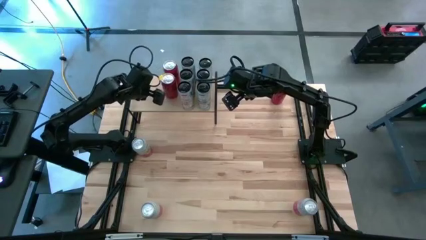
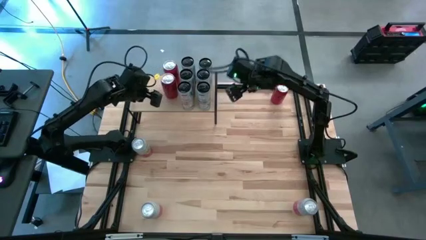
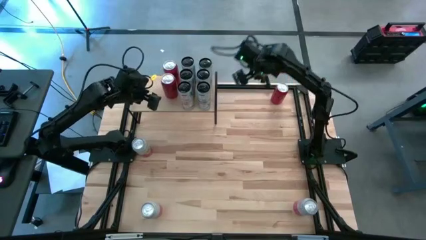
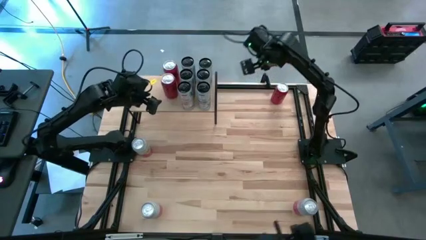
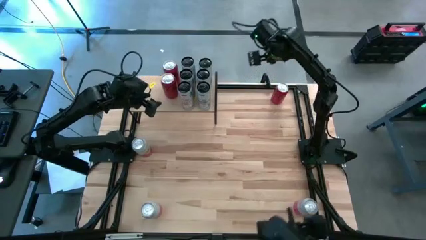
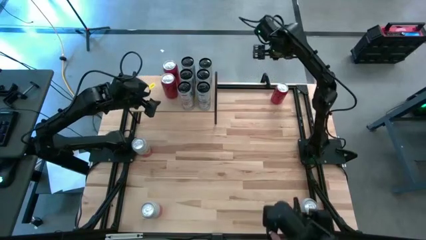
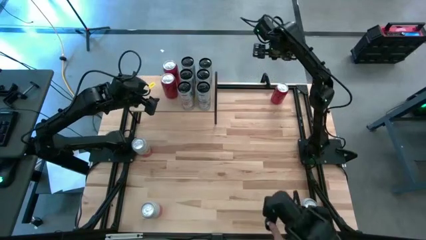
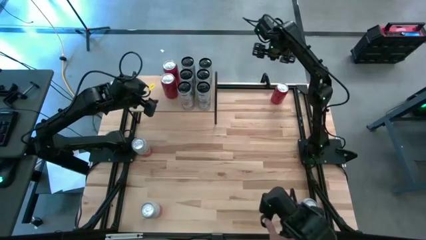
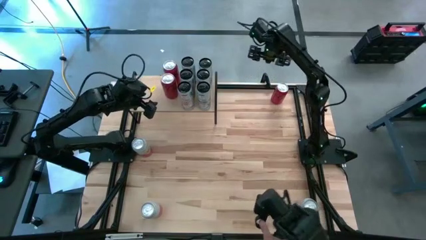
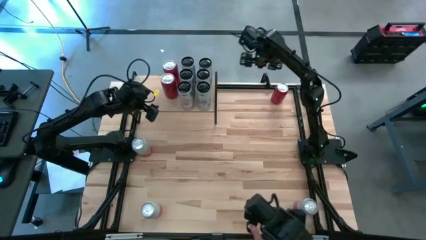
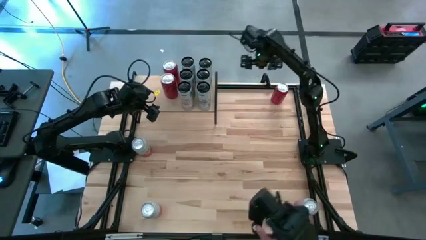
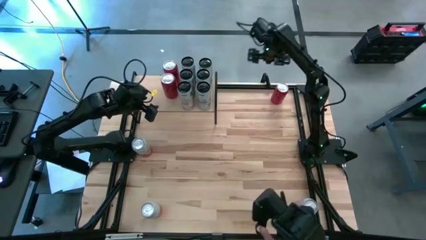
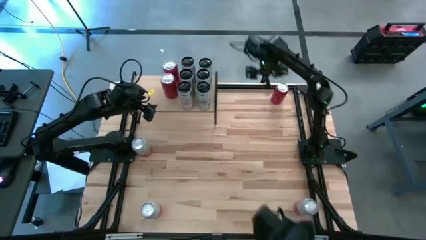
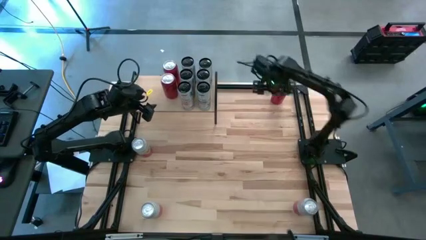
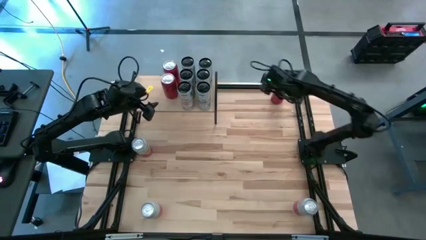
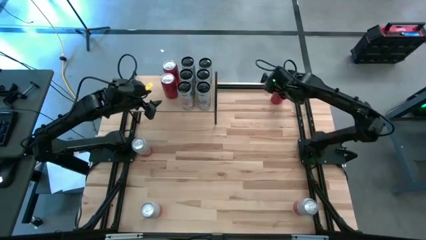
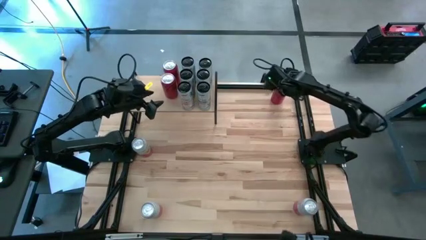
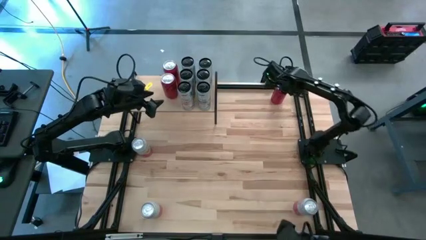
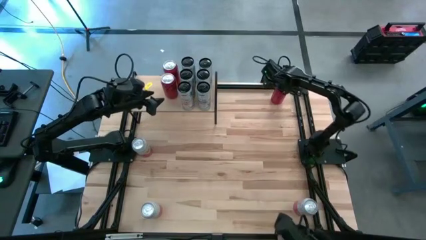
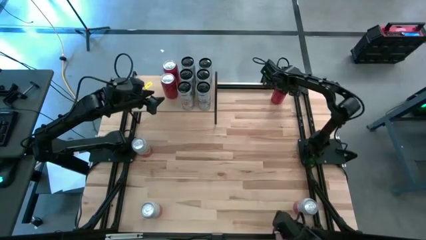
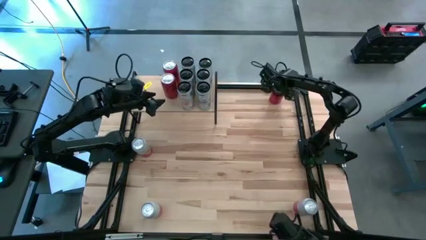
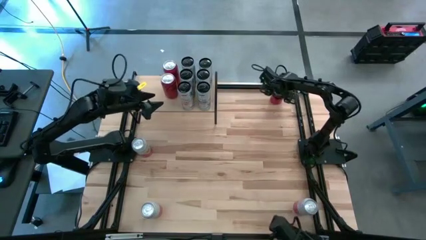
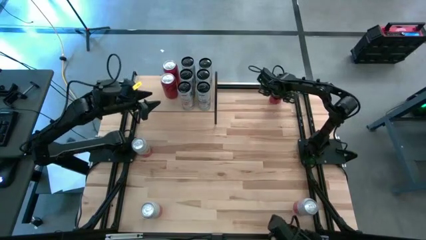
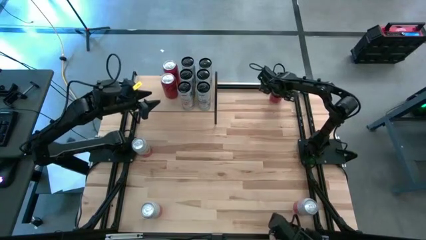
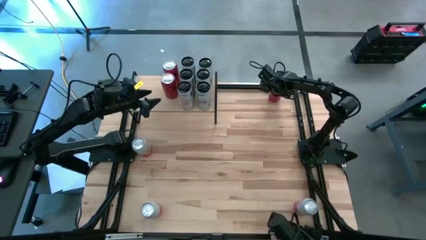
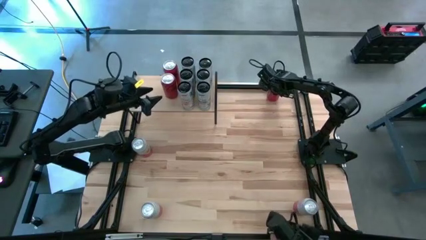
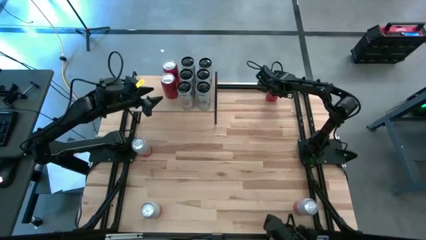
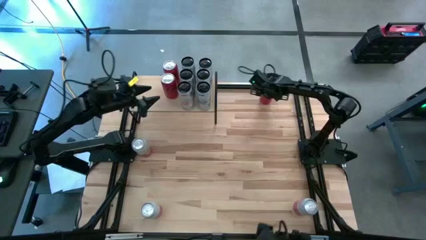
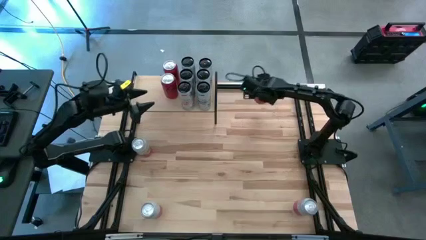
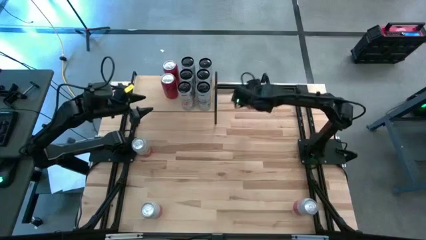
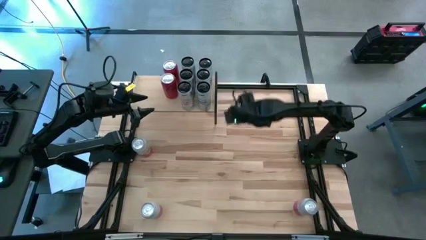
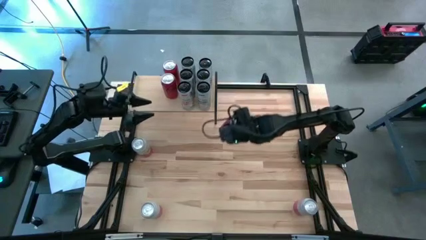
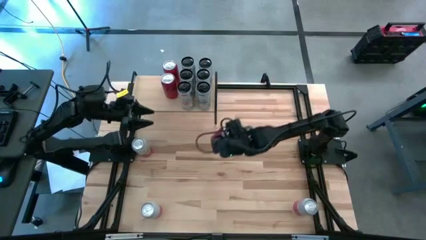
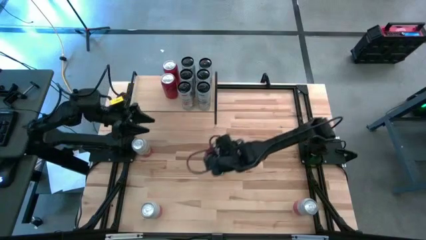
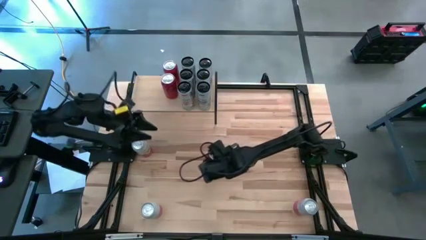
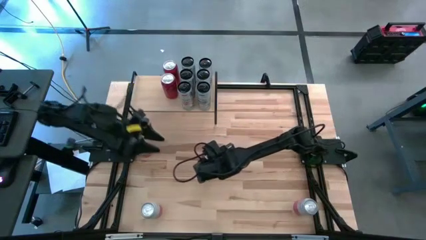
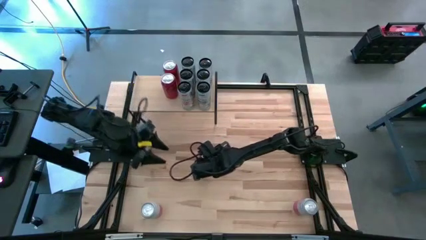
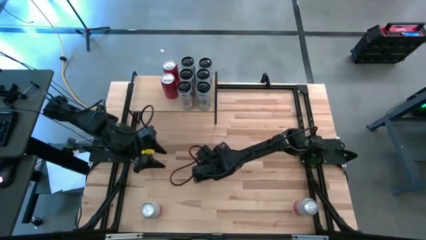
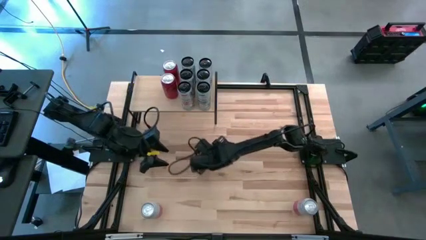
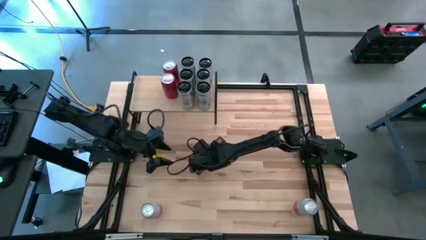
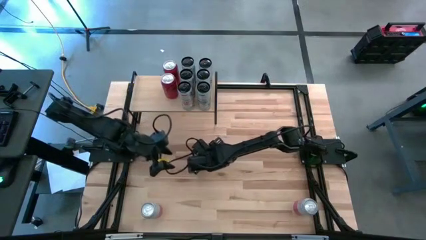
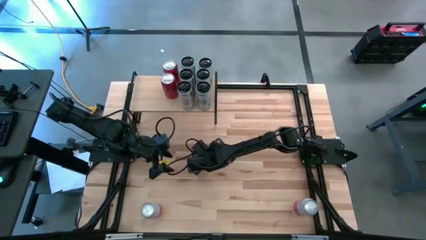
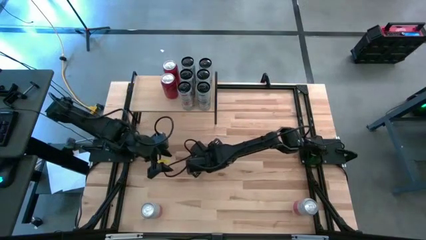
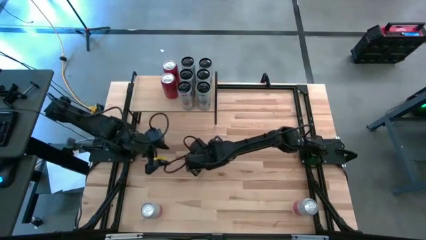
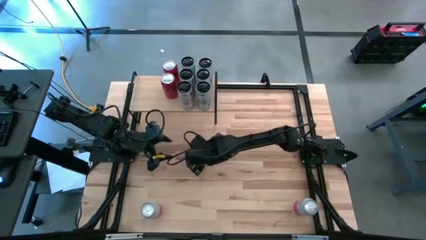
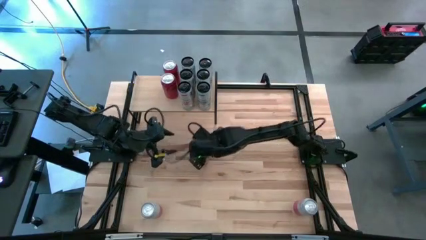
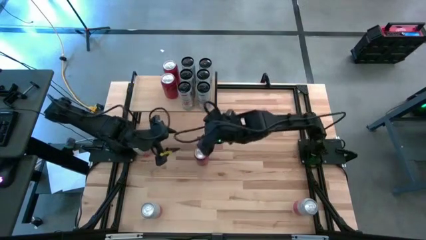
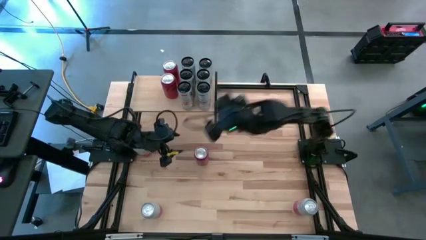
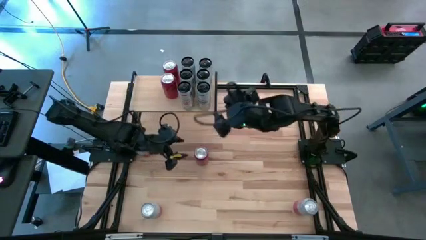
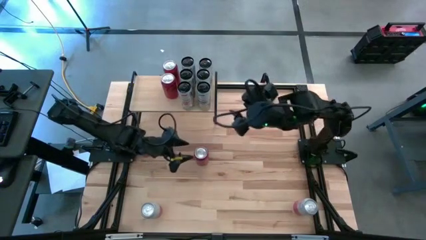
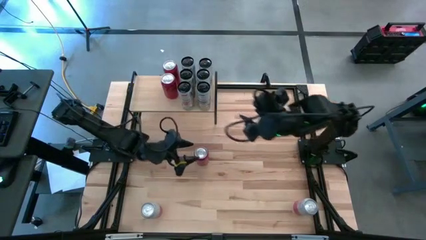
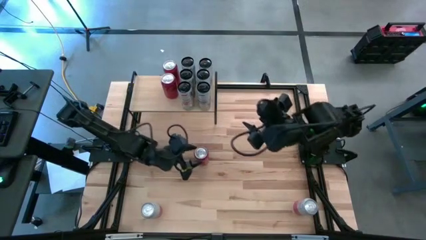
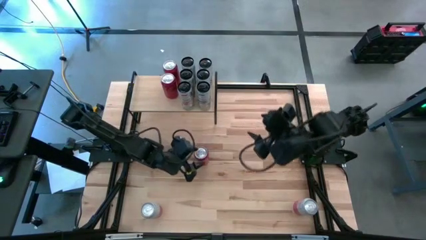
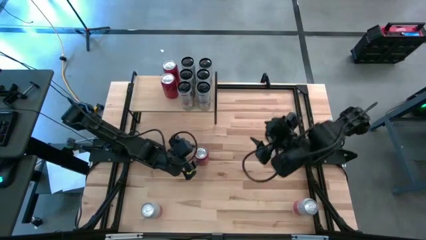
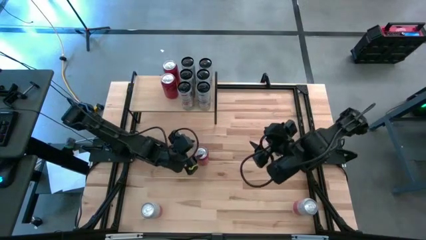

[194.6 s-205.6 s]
Task: Place canned beverage on shelf
Put the red soda can on the shelf aligned with the other red soda cans

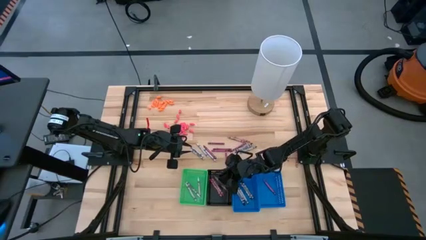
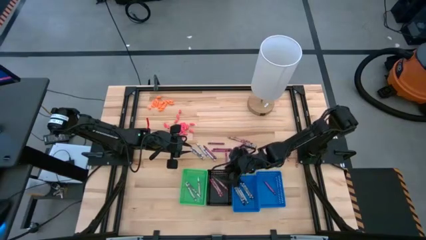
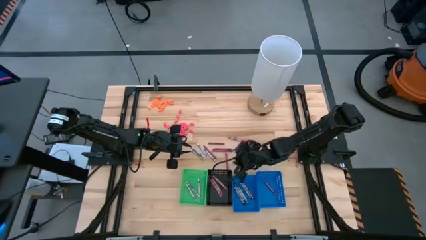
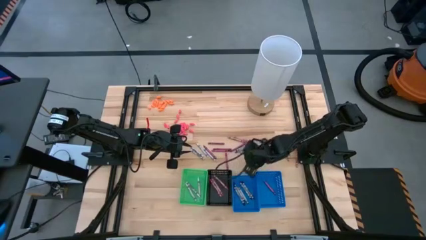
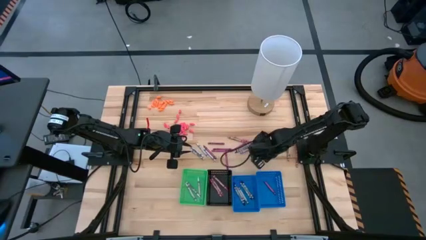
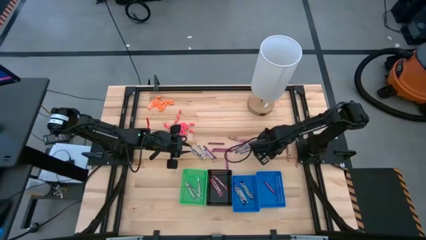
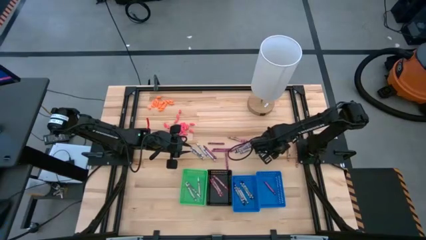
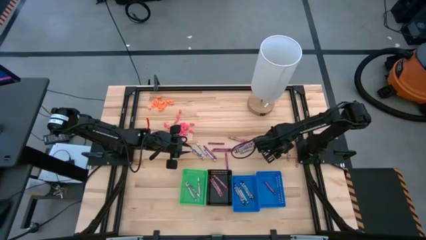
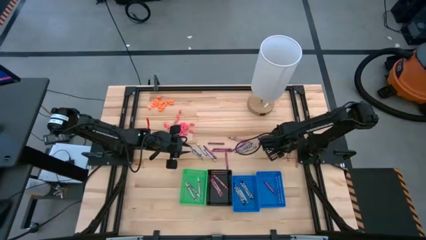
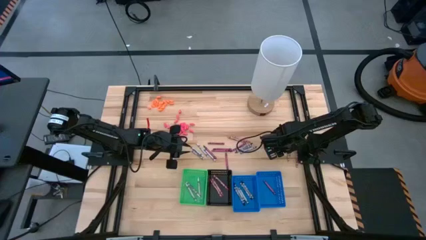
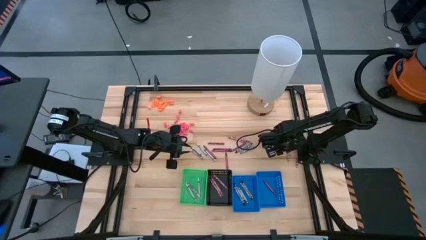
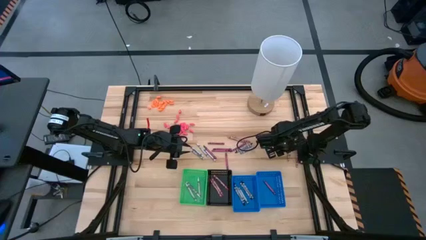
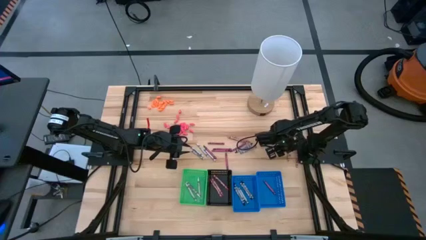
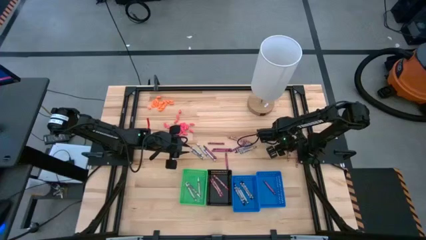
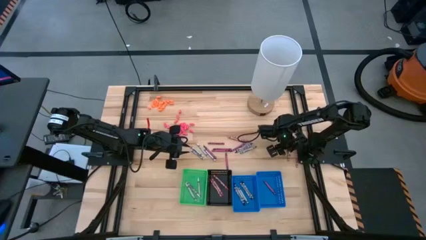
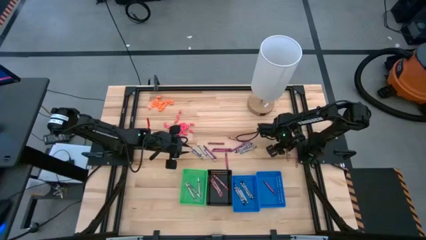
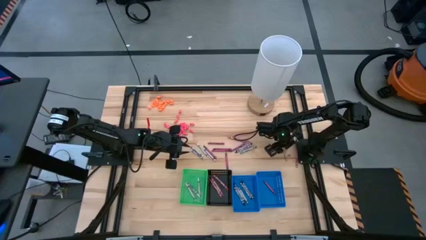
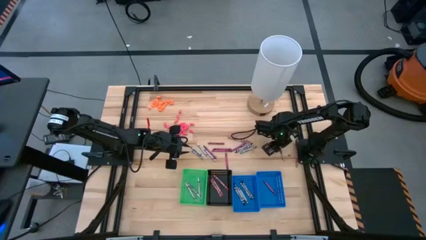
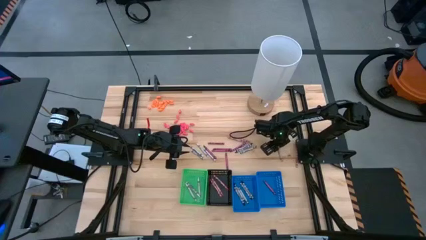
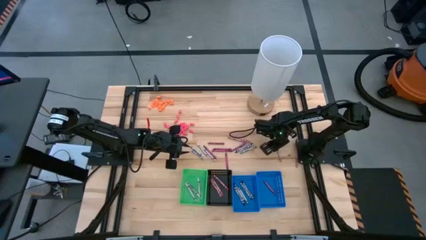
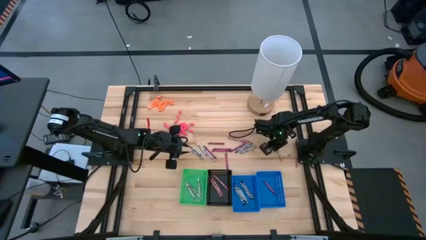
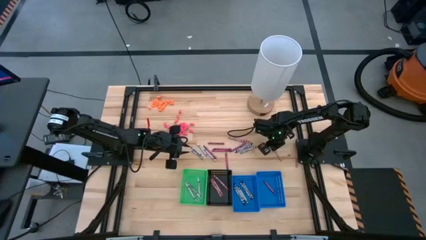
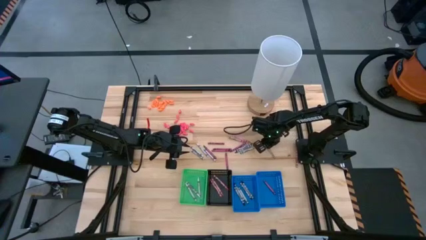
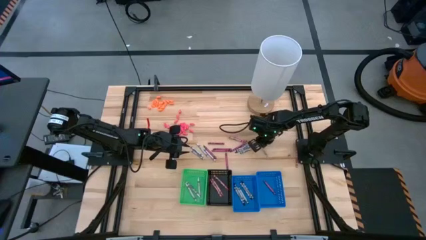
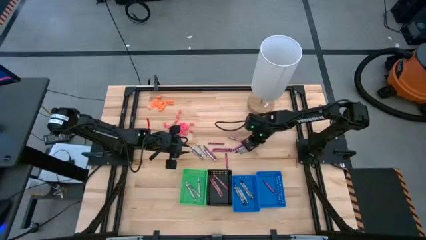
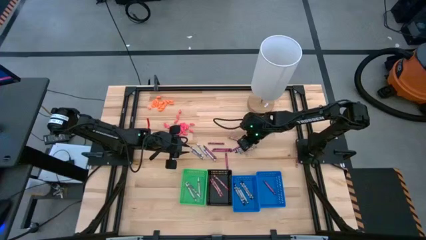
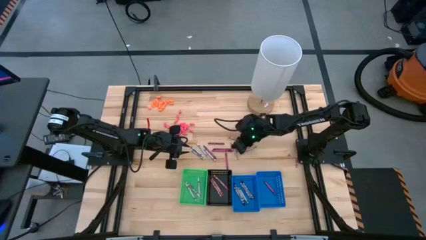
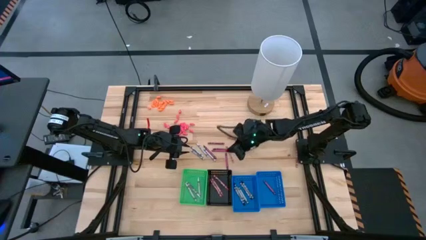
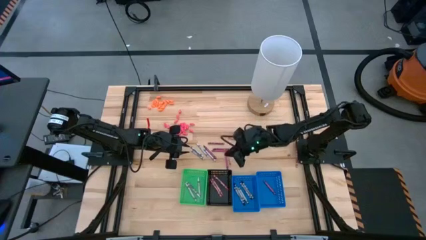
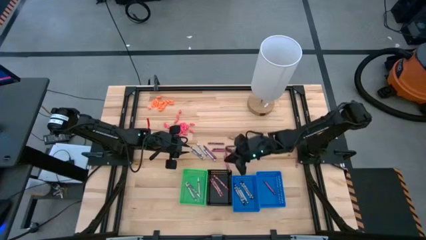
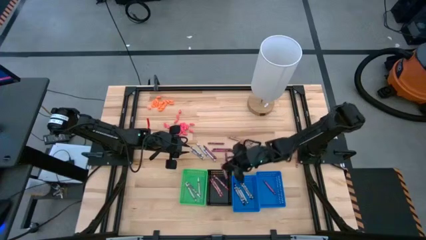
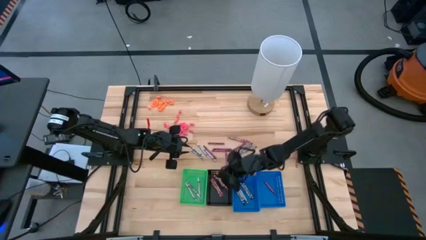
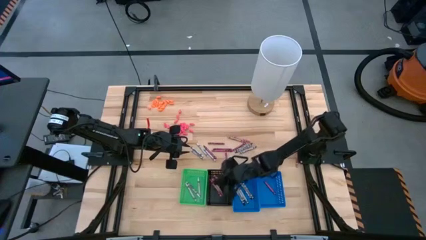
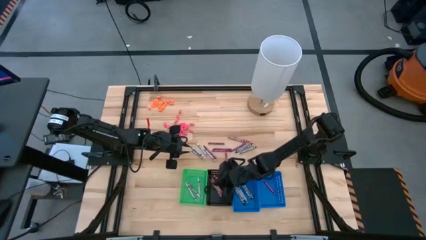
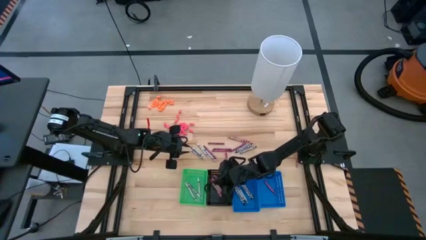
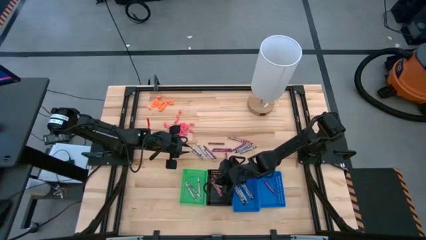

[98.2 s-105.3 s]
Task: Sort crayons
Put the pink crayon into the black bin
